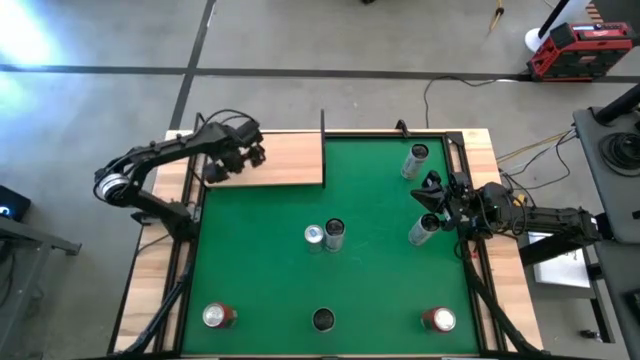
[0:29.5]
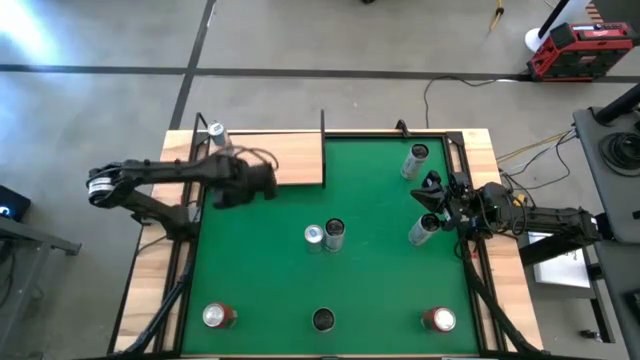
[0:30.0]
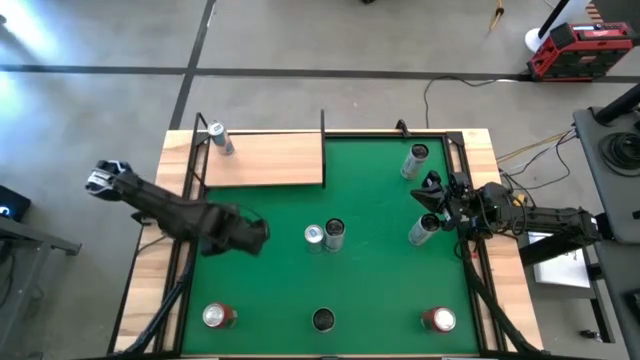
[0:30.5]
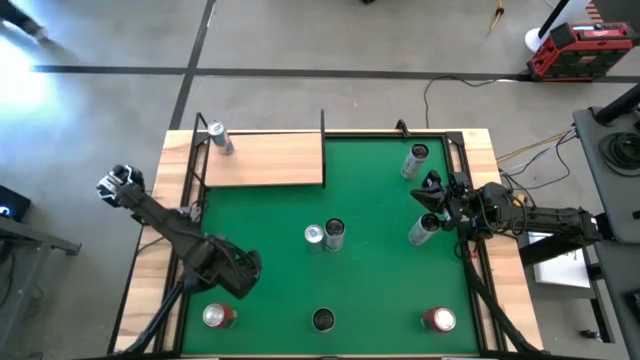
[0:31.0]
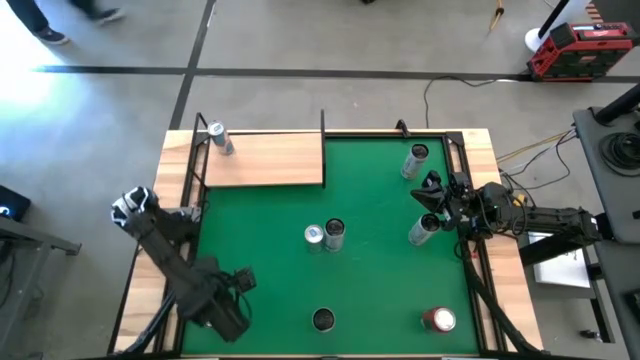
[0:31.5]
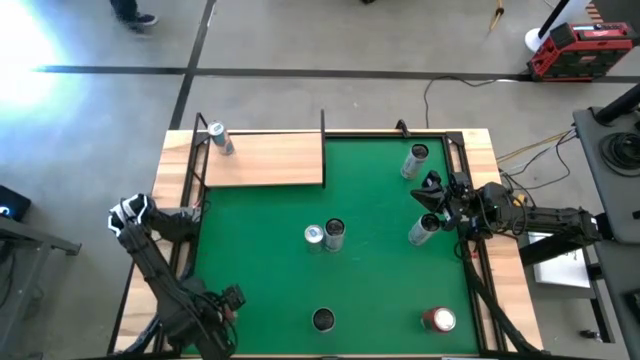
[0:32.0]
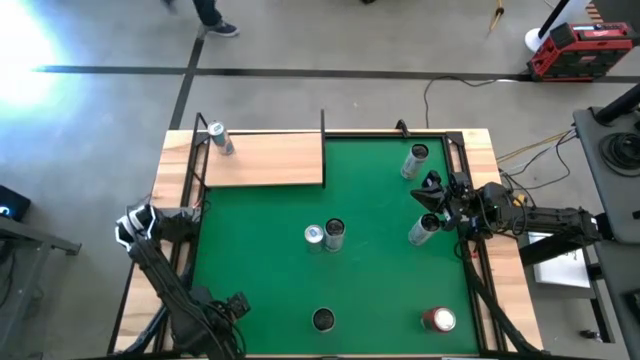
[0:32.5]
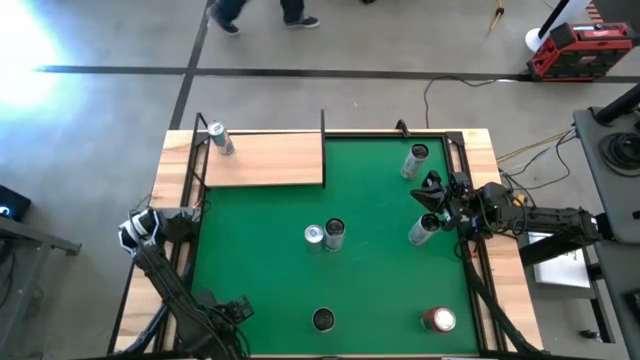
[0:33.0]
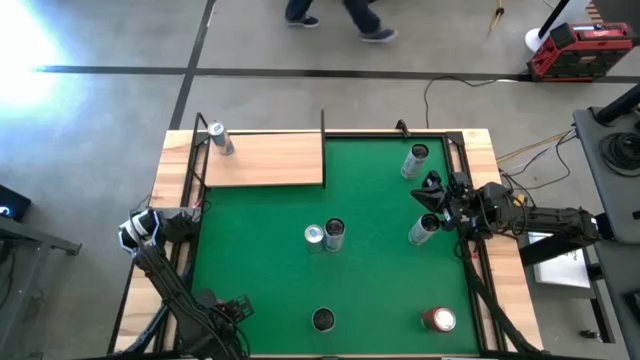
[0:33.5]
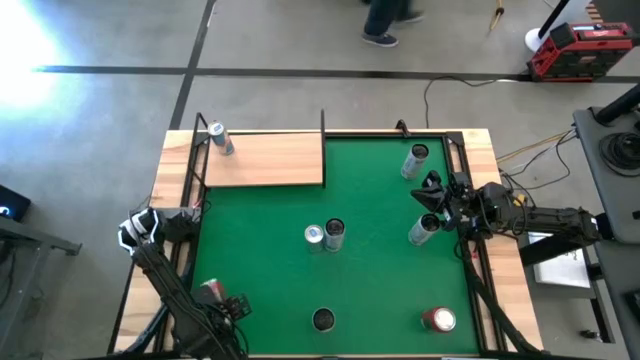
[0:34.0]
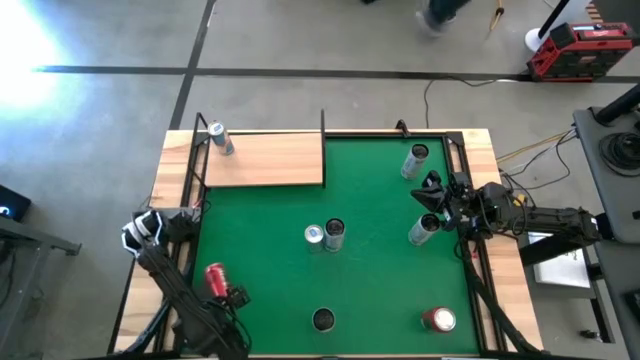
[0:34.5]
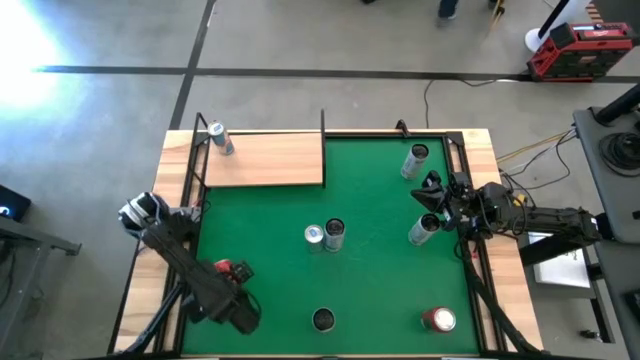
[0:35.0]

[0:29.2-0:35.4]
Task: Place canned beverage on shelf
Put the left red soda can on the shelf

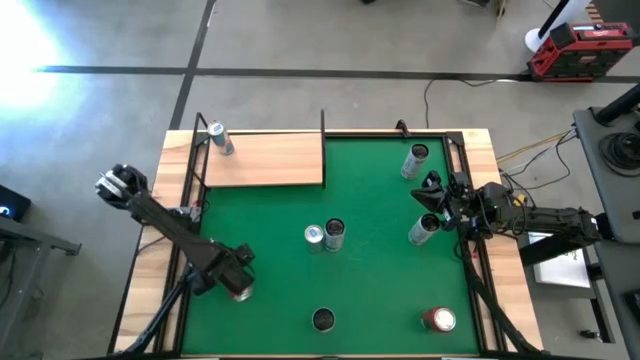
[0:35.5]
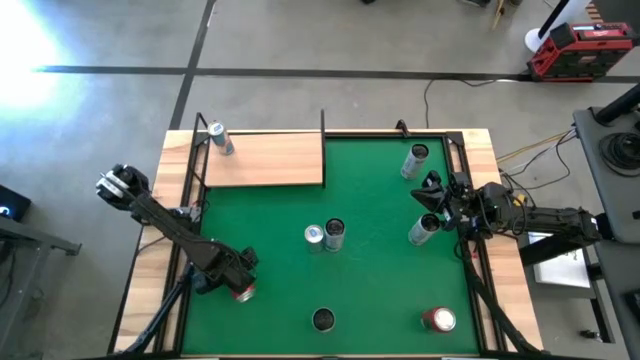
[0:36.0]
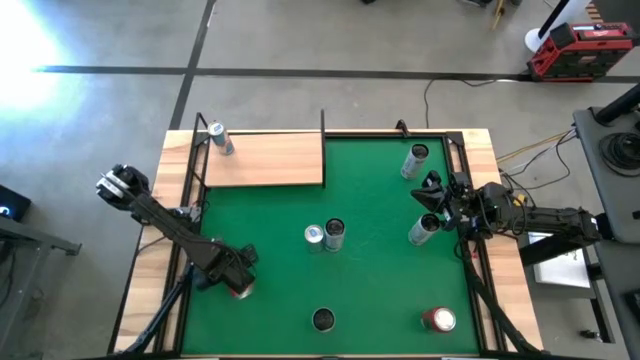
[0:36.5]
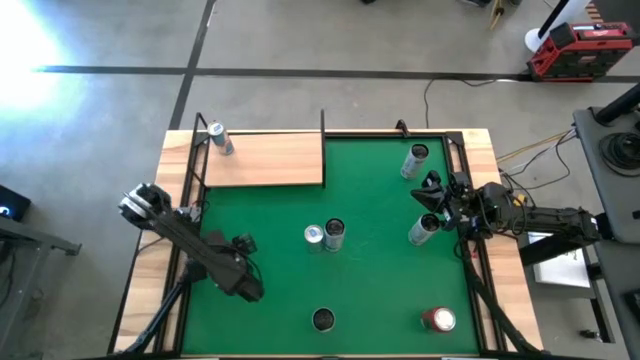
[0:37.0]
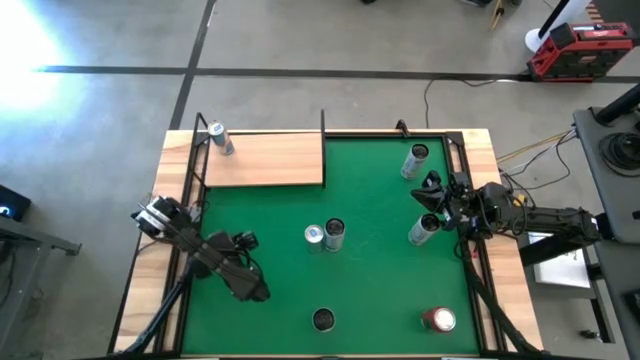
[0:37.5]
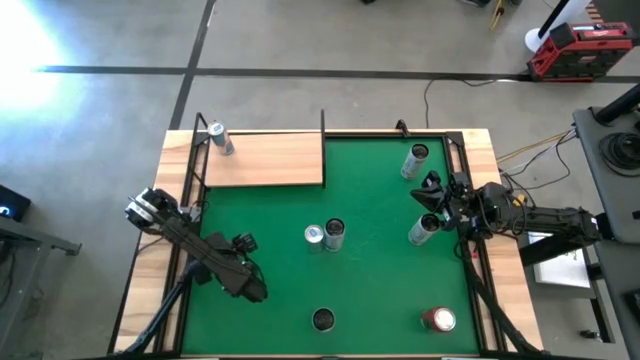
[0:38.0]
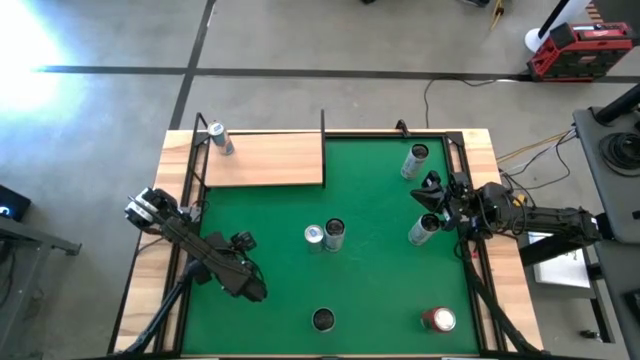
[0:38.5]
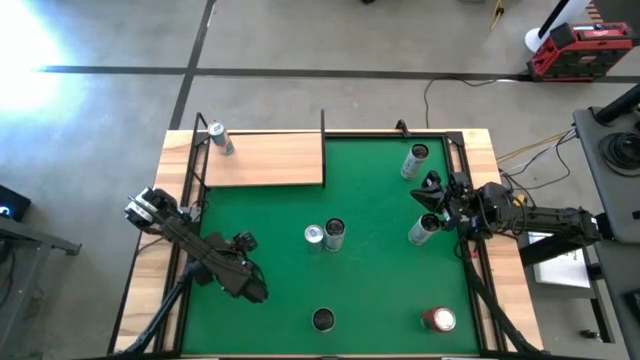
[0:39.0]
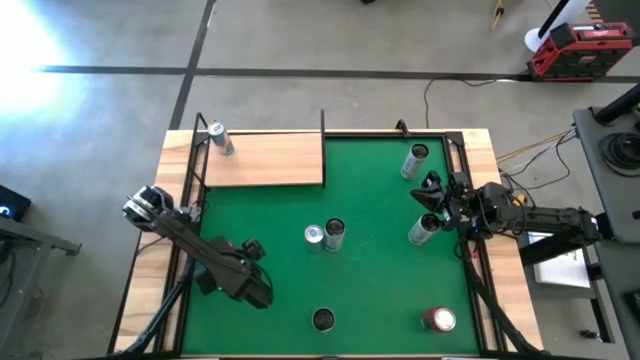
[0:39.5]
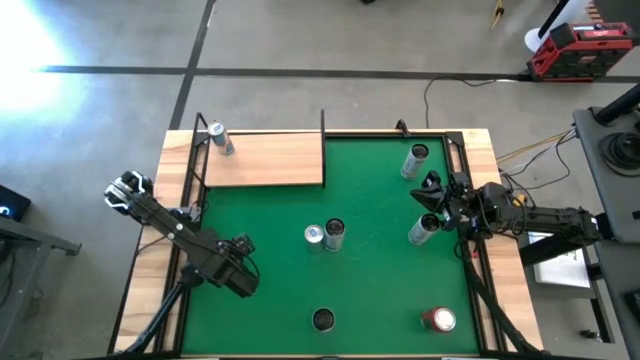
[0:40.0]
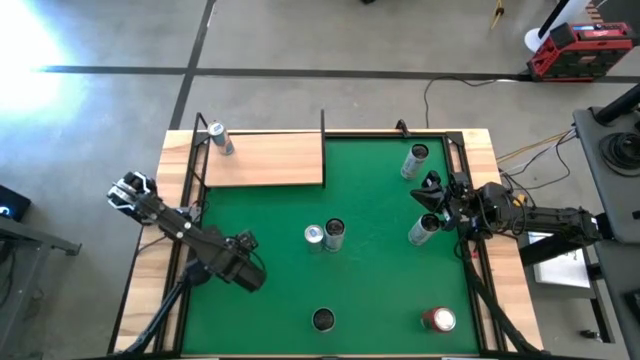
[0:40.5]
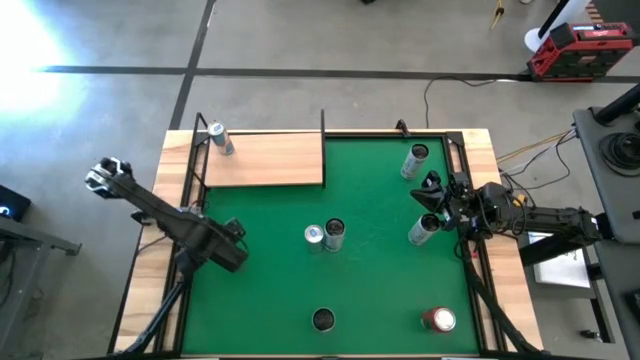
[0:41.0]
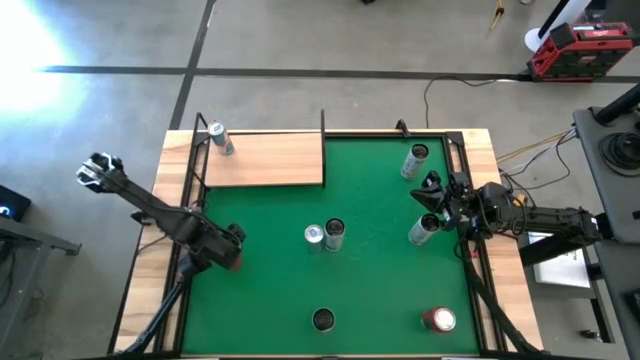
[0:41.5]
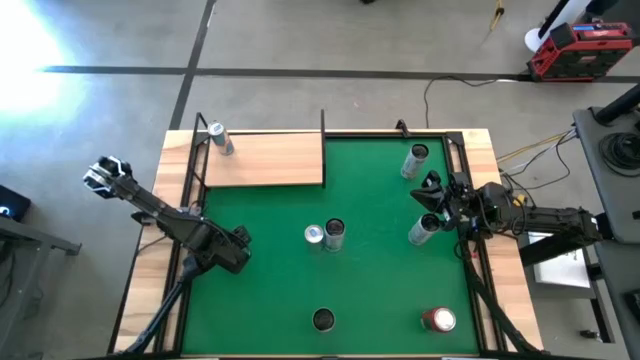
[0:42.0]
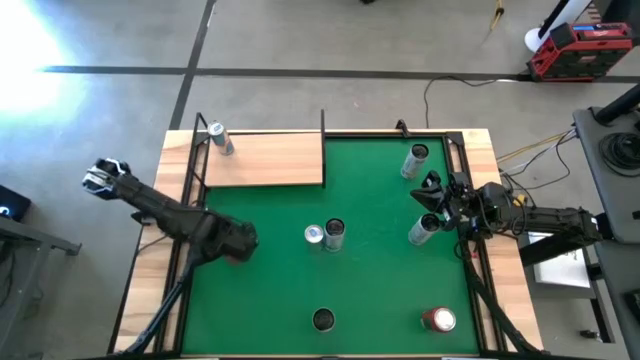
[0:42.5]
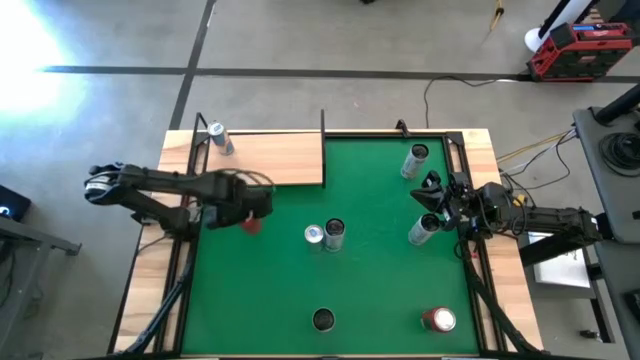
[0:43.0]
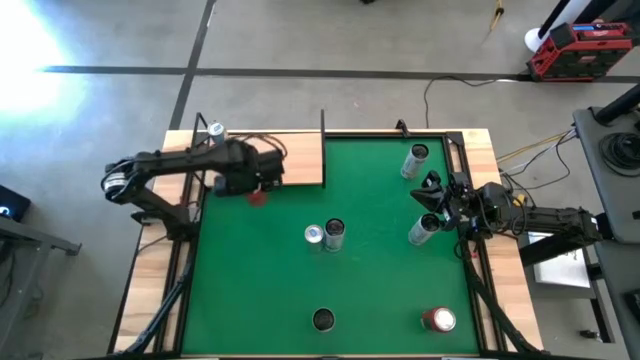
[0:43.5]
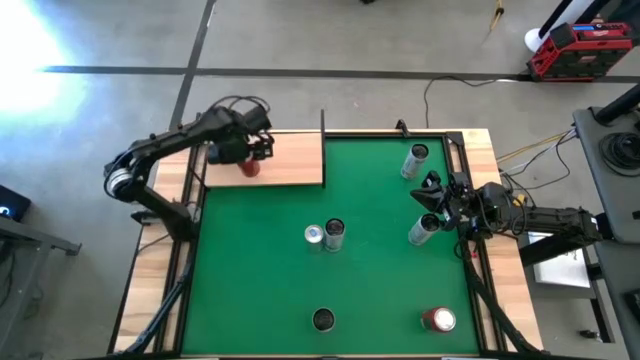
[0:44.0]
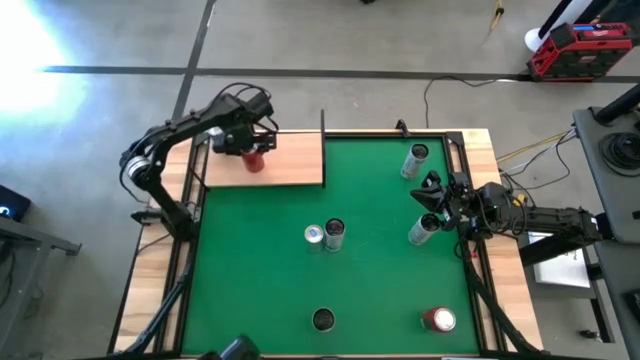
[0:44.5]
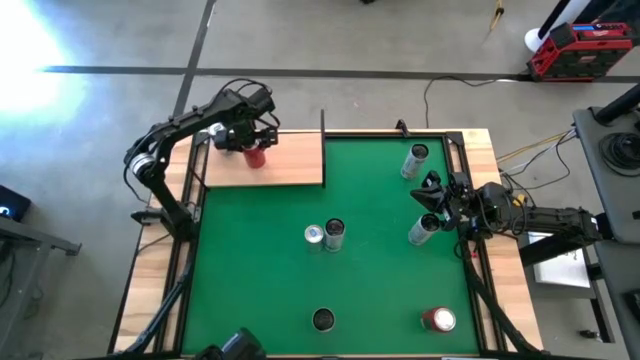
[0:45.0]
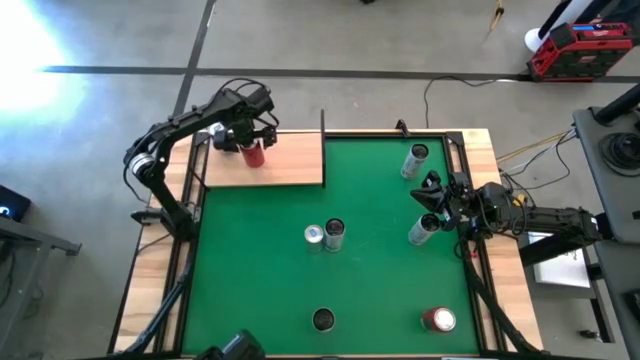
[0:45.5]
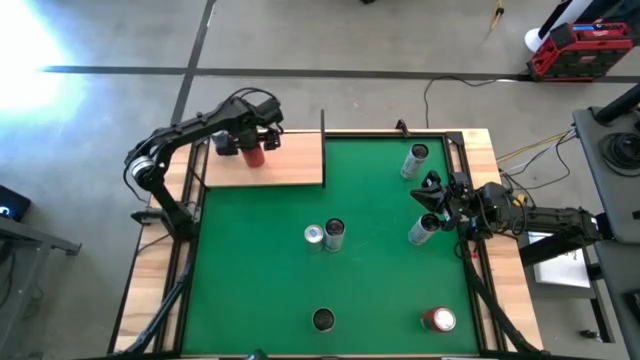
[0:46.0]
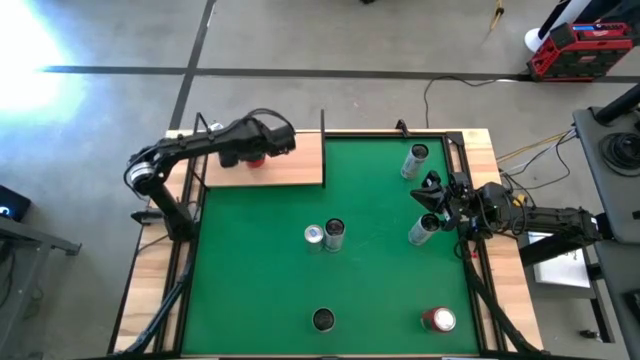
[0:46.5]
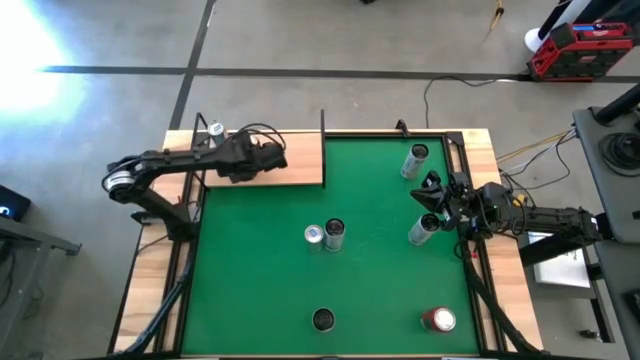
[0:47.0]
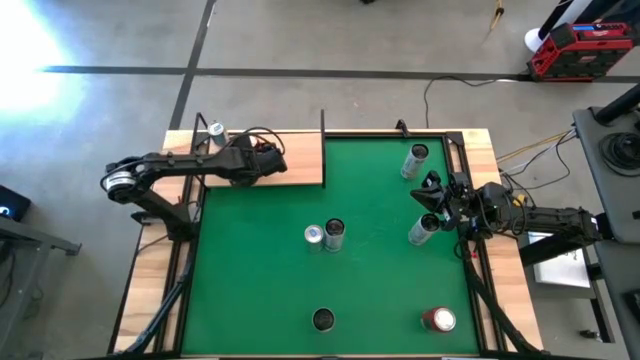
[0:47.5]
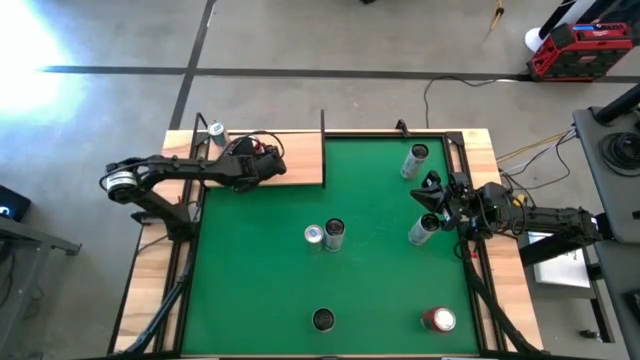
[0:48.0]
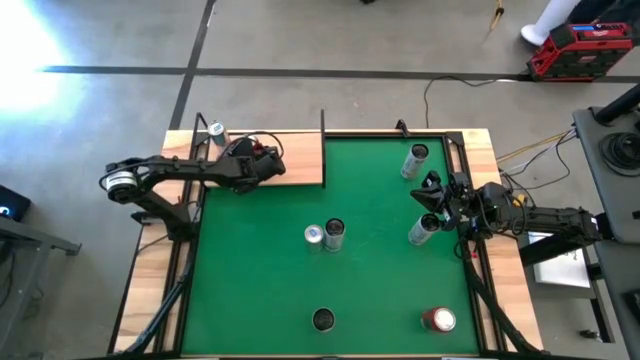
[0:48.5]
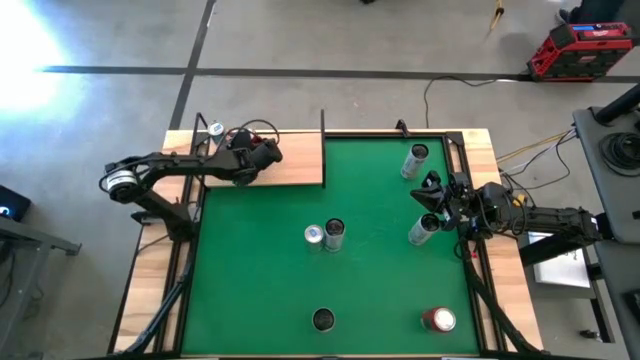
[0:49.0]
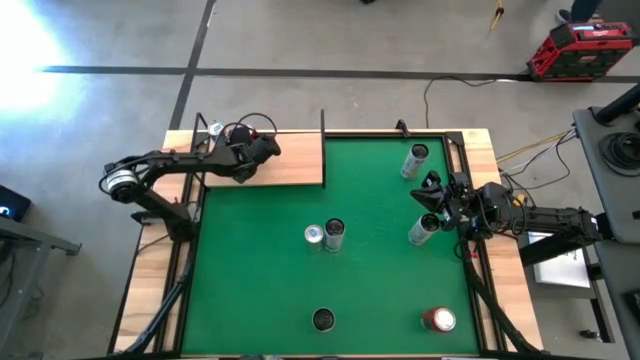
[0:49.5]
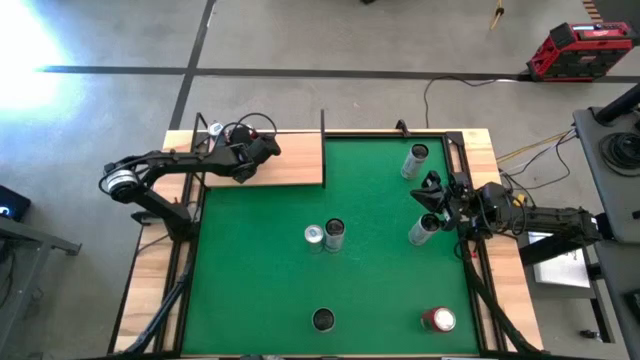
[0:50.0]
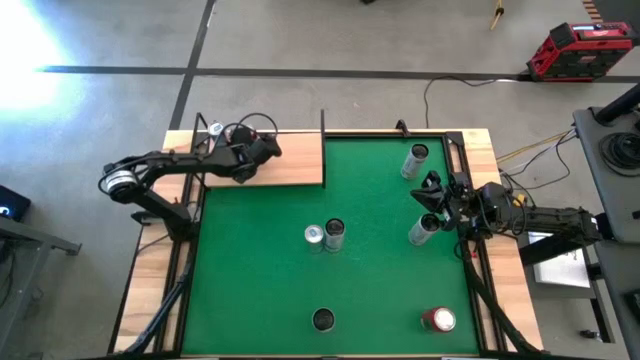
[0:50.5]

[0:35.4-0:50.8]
Put the left red soda can on the shelf

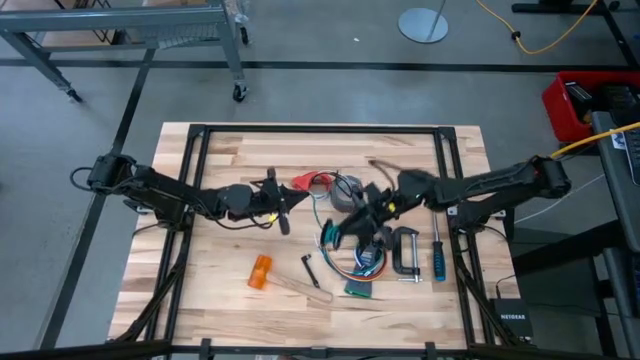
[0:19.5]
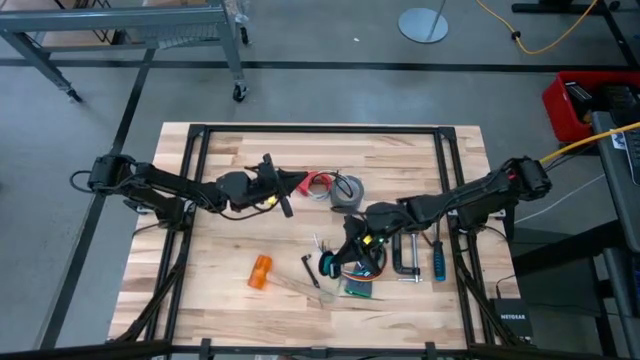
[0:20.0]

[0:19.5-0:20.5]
Task: Coil cords
Uncoil the blue wire from the spool
